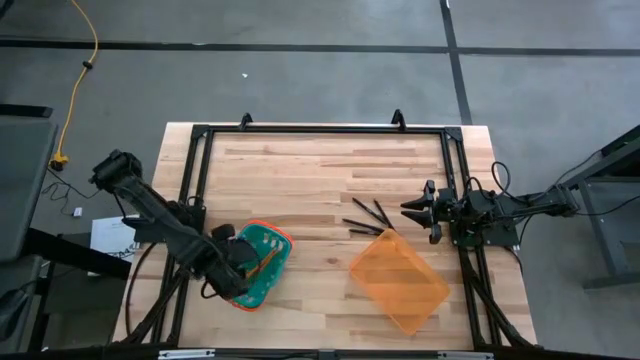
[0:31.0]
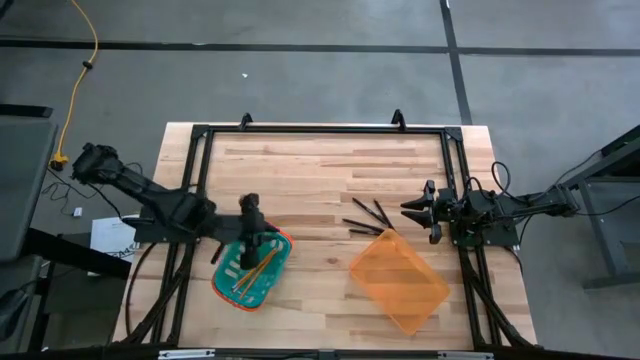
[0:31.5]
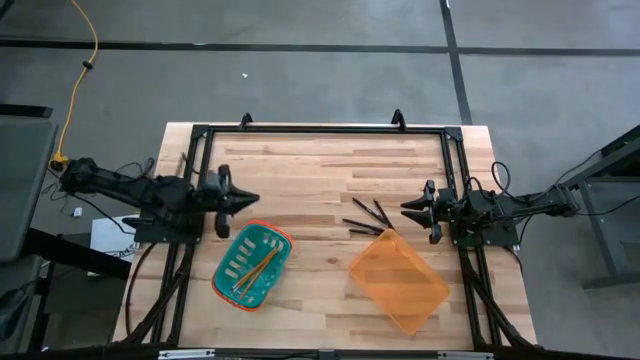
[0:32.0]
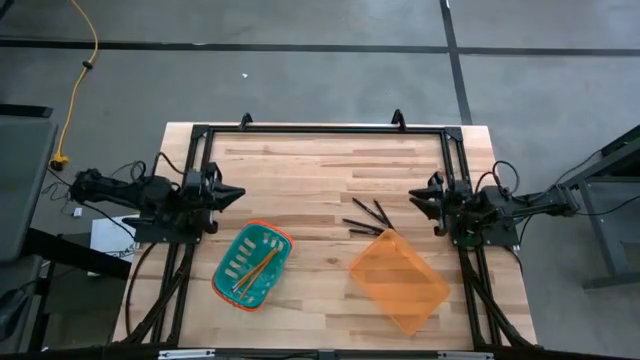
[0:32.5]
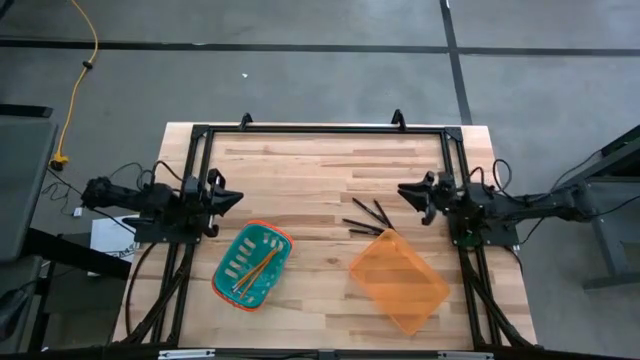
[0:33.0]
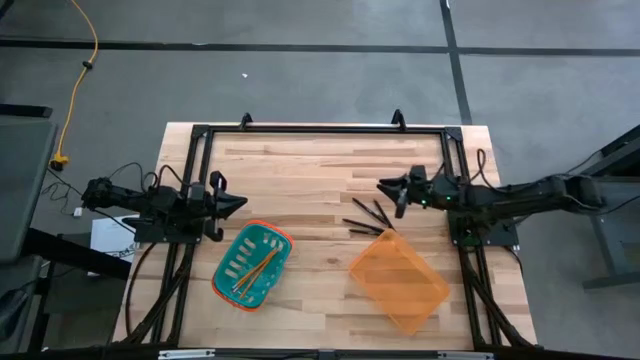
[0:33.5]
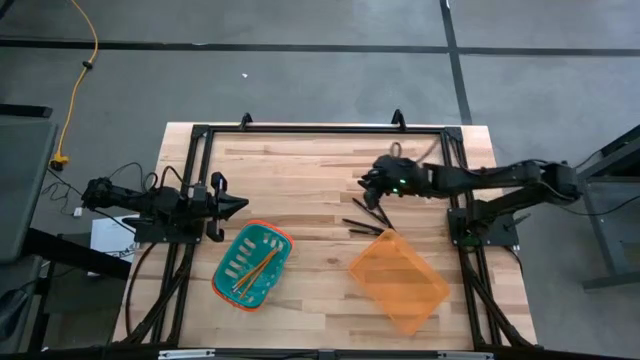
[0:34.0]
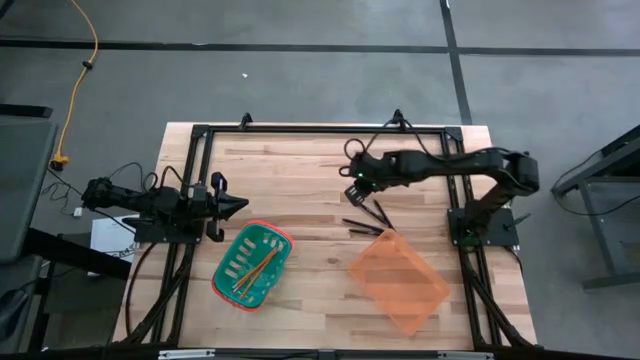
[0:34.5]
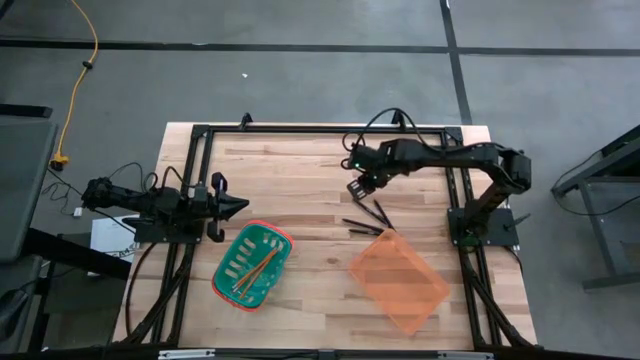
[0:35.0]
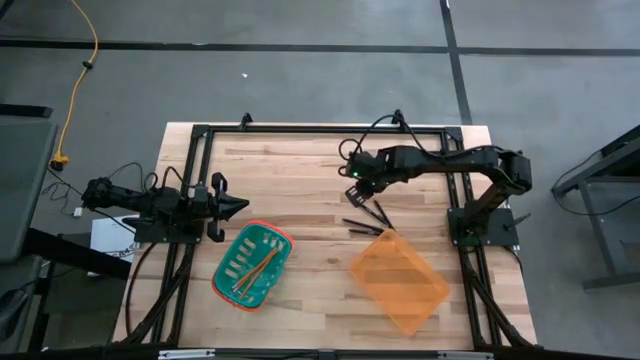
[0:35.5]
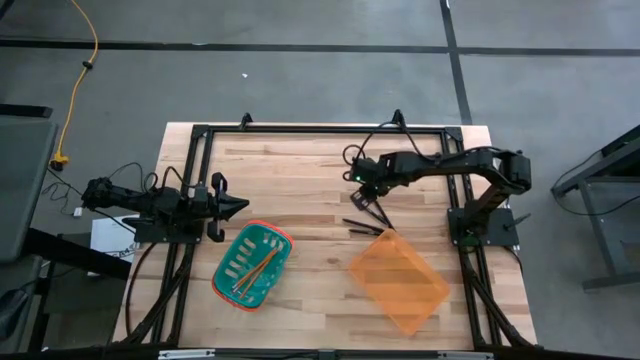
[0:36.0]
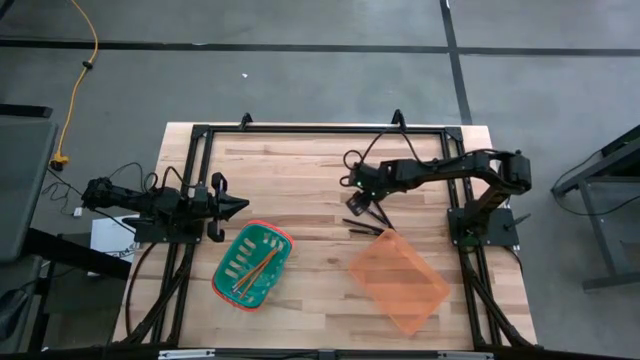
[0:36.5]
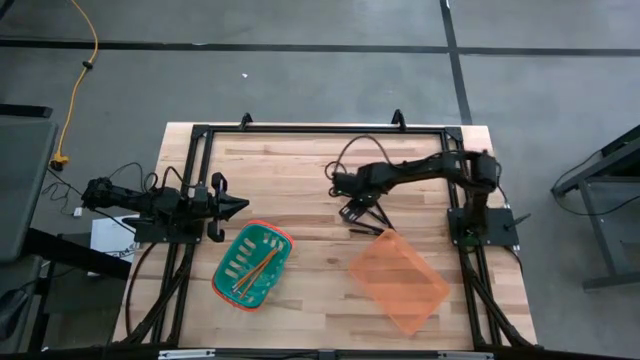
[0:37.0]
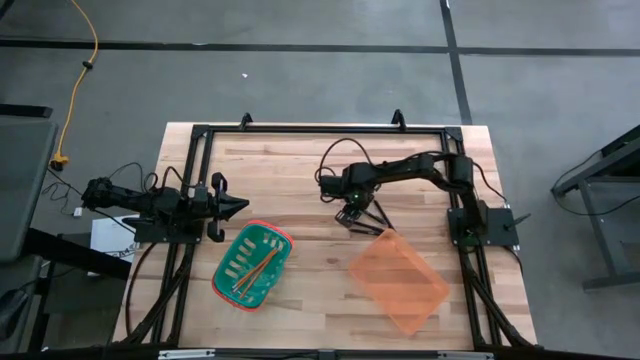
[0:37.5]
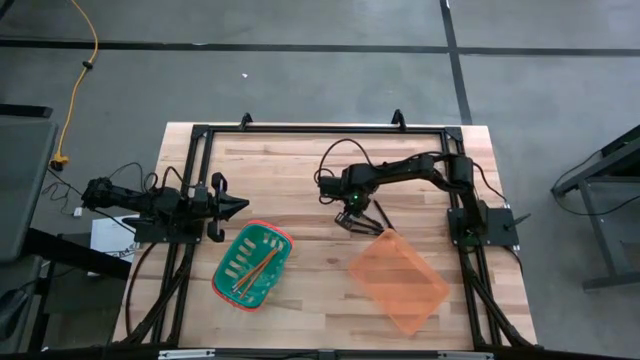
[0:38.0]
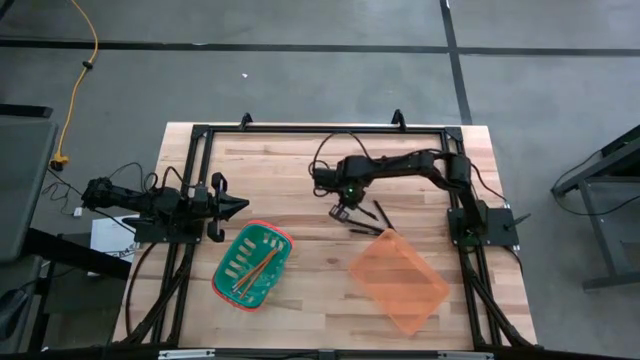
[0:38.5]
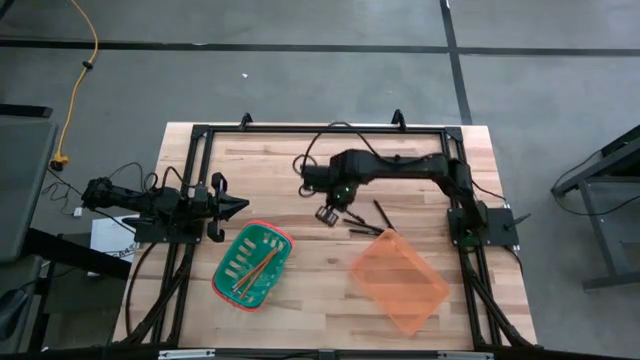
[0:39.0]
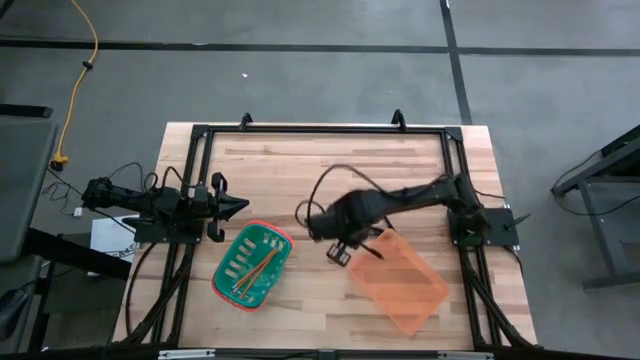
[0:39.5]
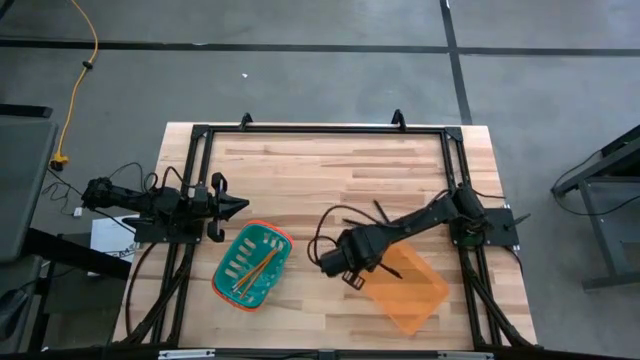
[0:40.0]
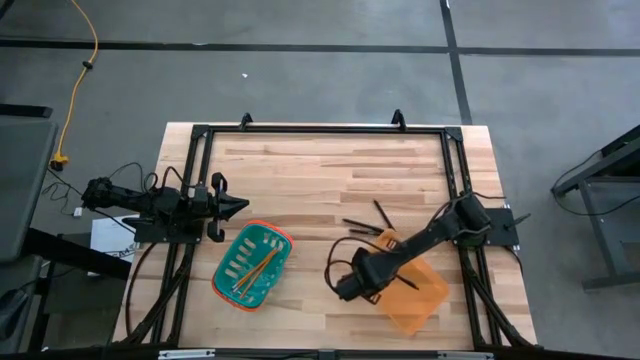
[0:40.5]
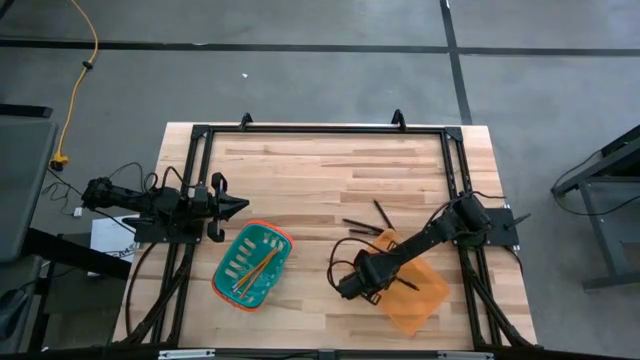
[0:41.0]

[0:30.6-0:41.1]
Task: Sort pens & pencils
Put the black pen into the orange bin

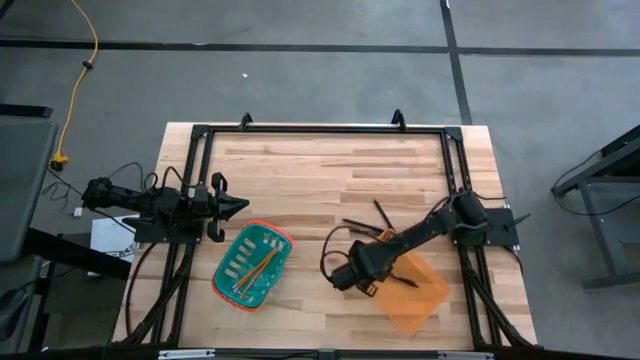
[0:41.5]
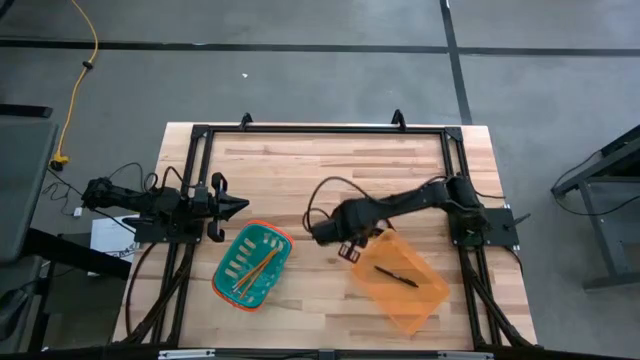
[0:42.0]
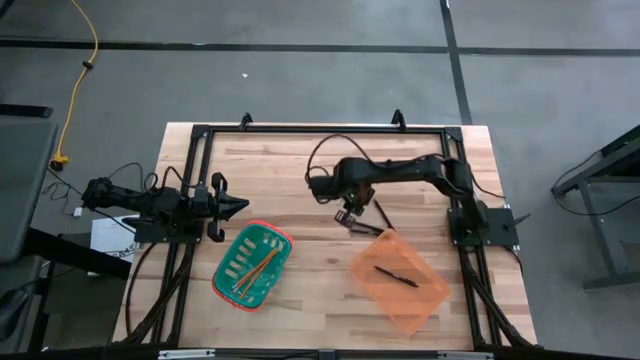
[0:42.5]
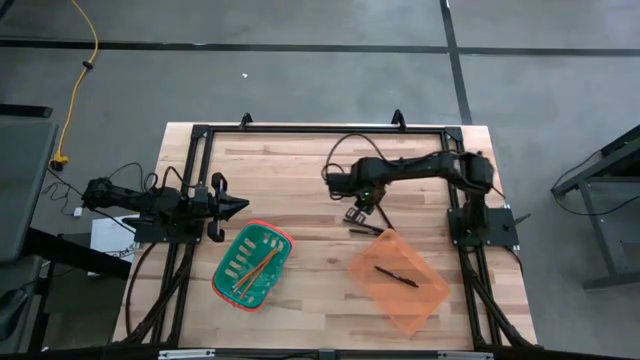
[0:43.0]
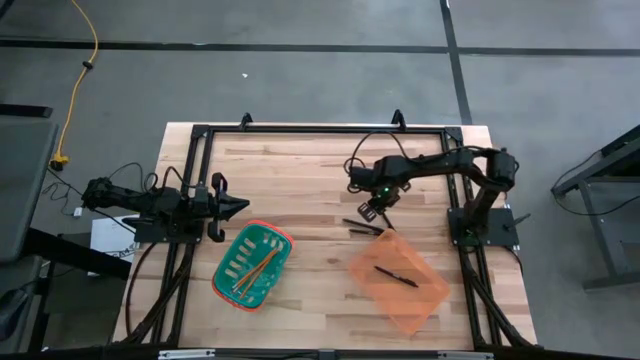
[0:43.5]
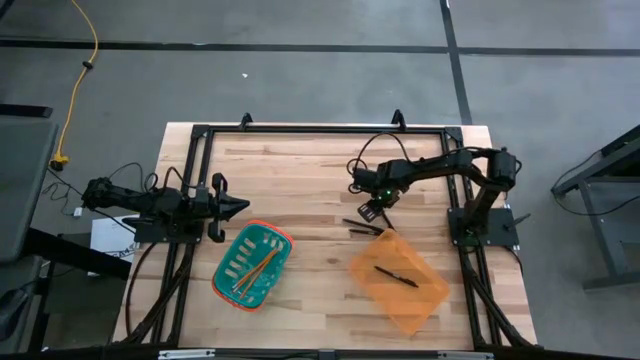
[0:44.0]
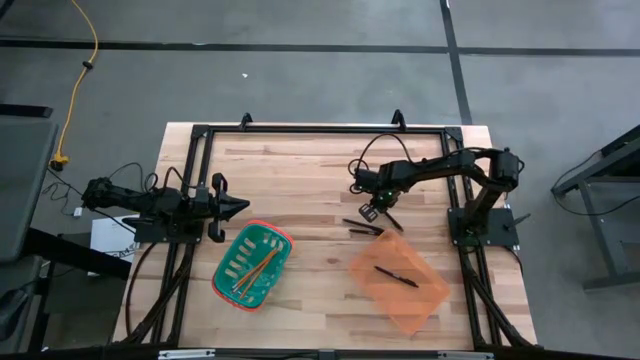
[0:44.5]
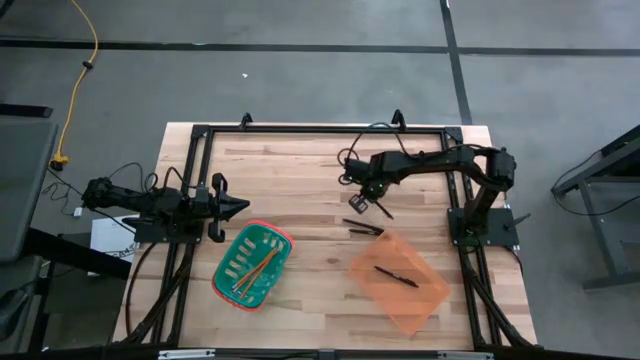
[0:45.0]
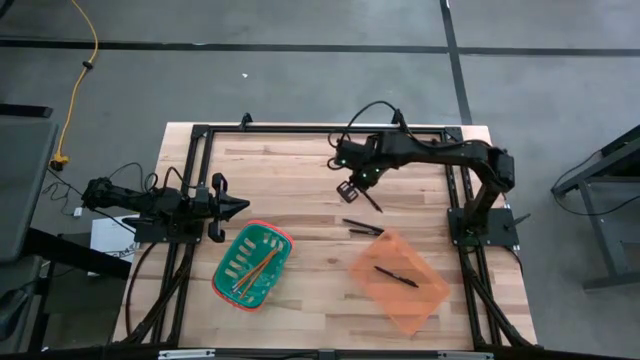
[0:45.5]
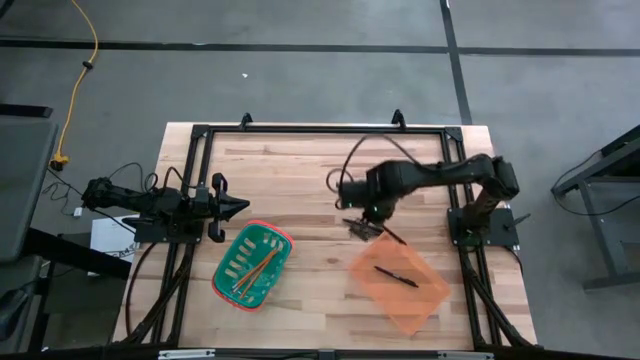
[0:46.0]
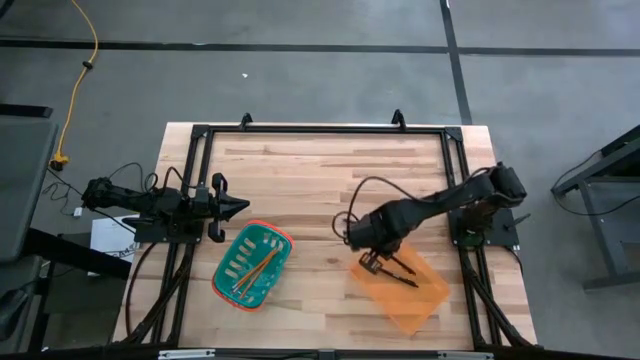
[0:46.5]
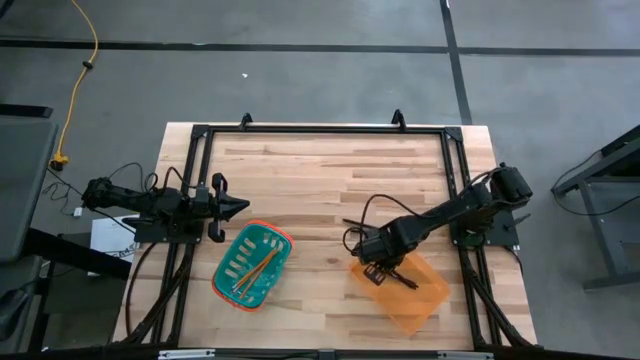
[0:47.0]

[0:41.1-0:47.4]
Put the black pen into the orange bin

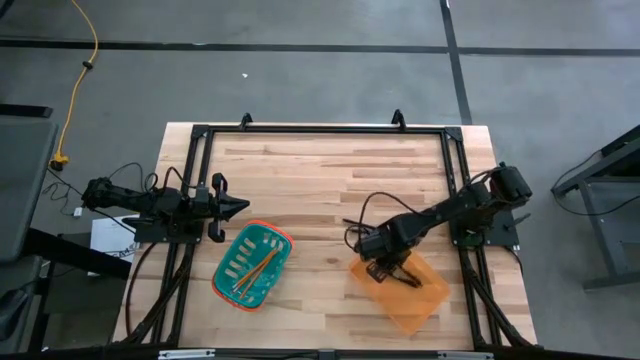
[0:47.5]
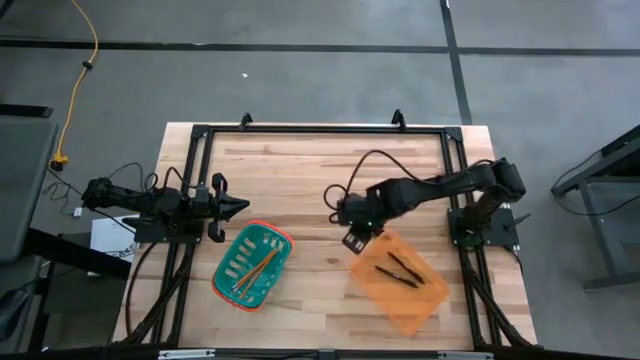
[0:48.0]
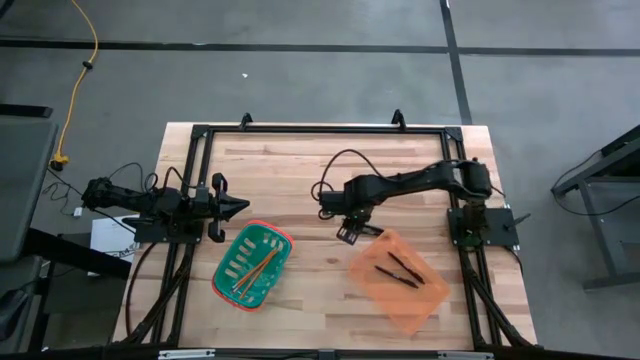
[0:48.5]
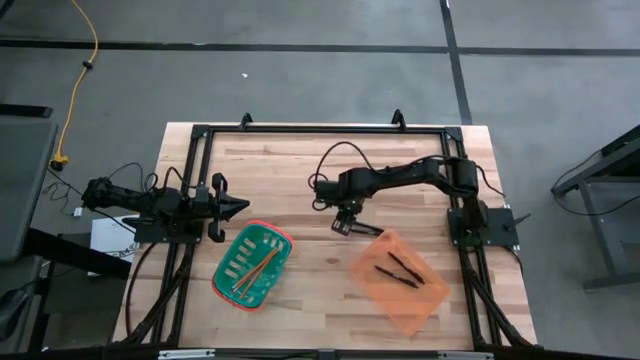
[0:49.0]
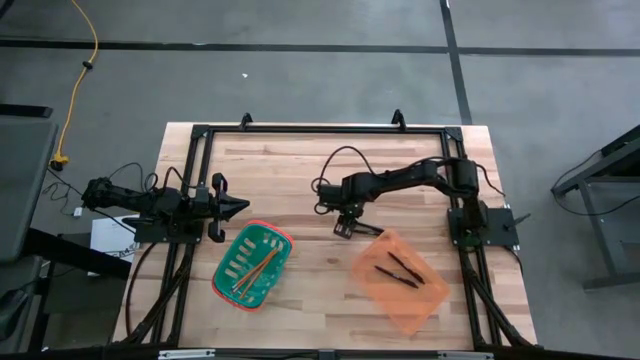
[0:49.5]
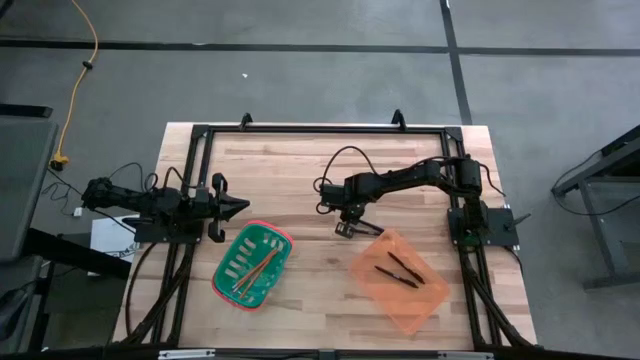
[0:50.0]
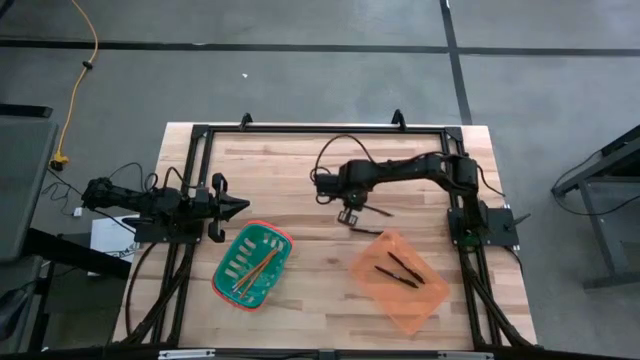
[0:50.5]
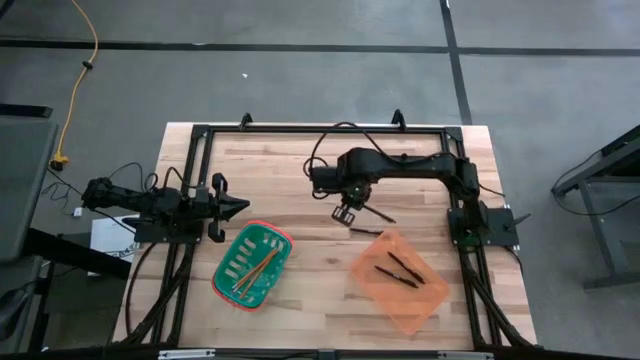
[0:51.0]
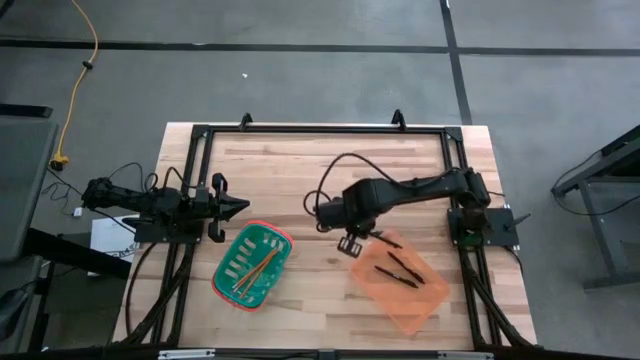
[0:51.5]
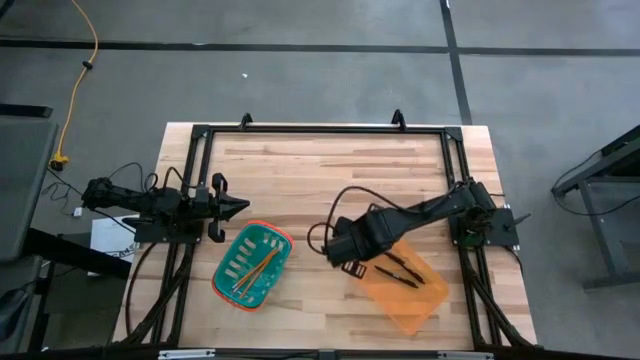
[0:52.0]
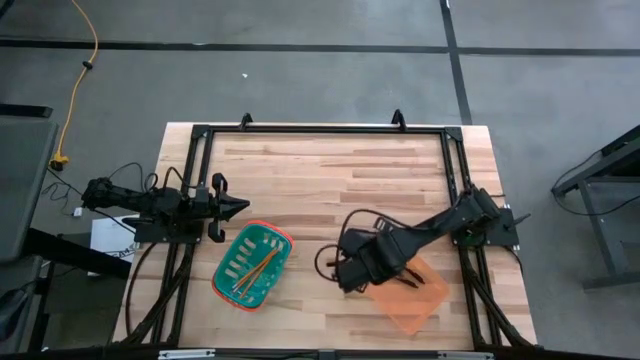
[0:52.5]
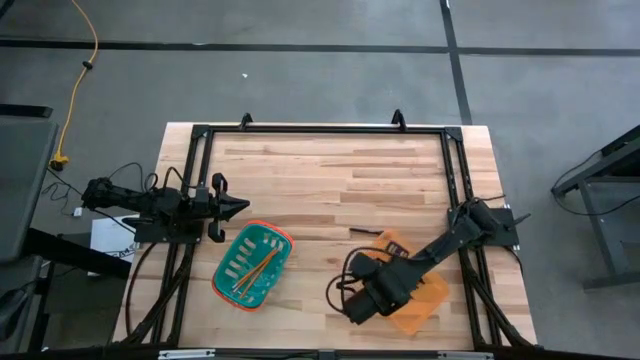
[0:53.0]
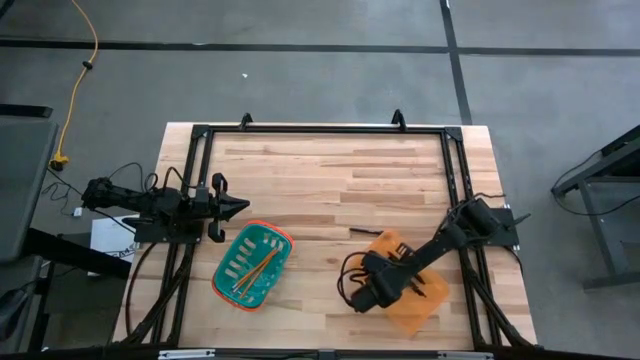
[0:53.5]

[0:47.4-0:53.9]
Put the black pen into the orange bin
